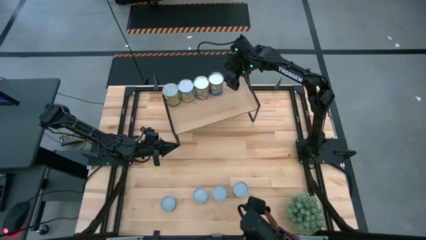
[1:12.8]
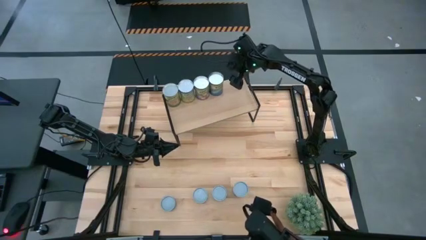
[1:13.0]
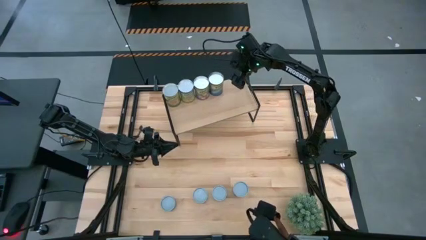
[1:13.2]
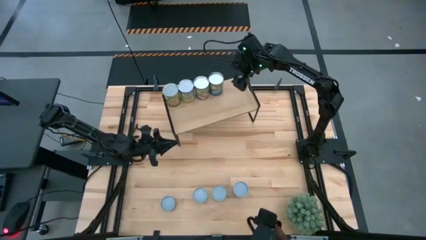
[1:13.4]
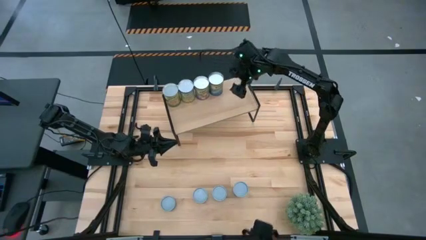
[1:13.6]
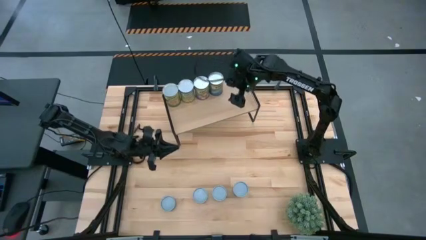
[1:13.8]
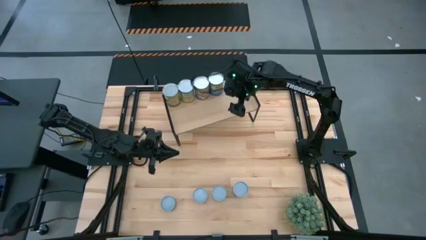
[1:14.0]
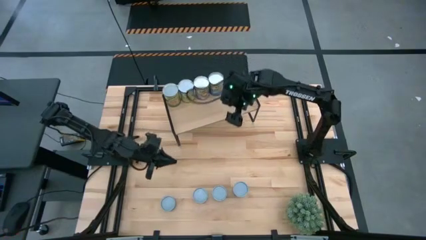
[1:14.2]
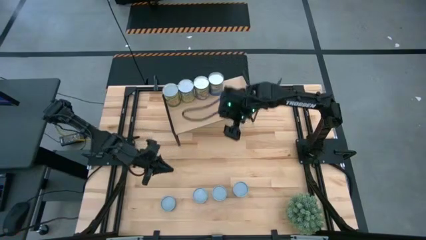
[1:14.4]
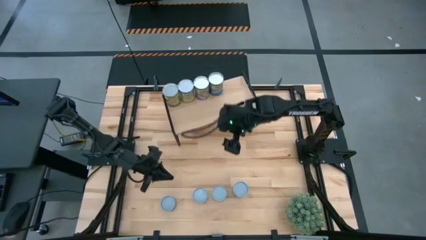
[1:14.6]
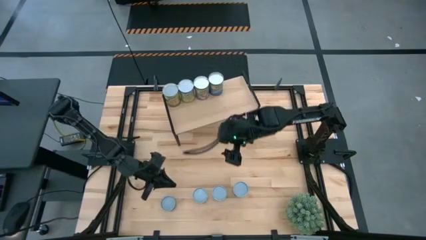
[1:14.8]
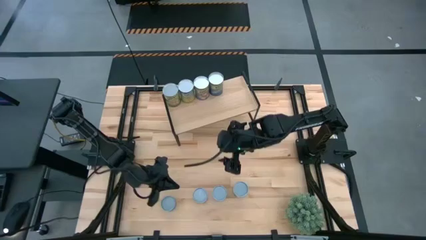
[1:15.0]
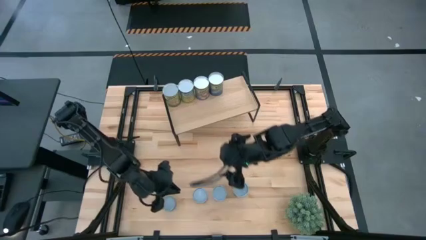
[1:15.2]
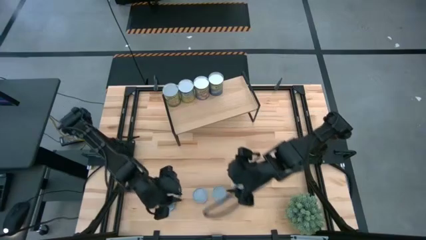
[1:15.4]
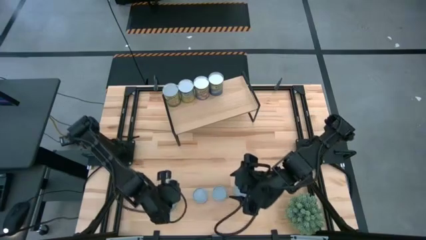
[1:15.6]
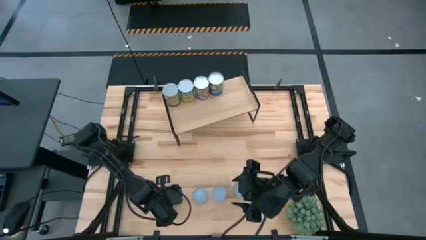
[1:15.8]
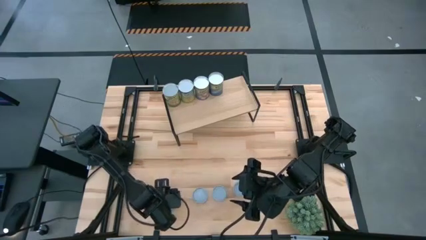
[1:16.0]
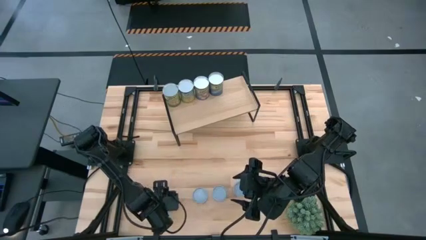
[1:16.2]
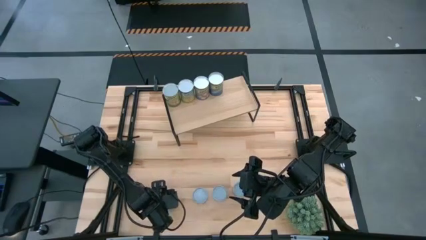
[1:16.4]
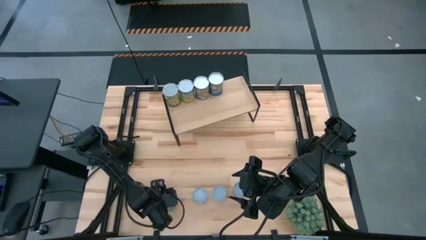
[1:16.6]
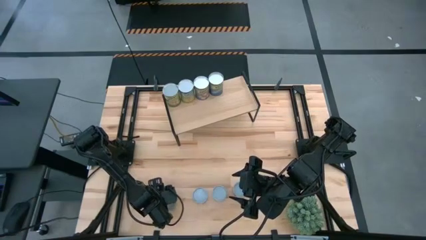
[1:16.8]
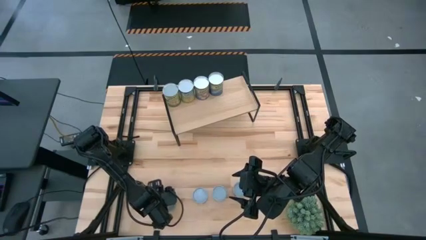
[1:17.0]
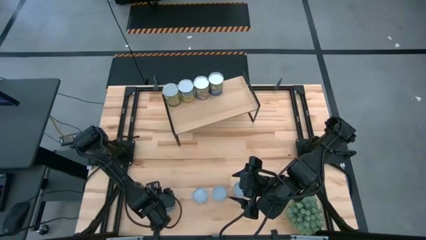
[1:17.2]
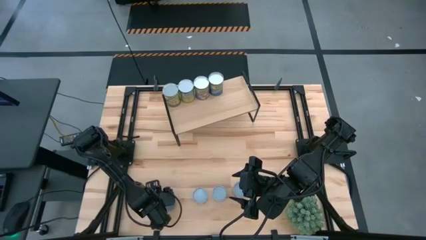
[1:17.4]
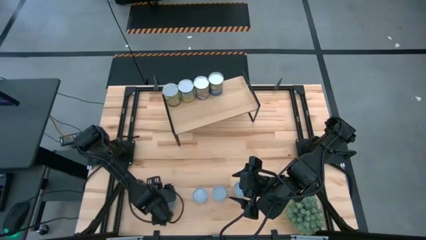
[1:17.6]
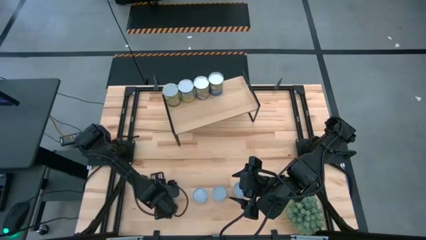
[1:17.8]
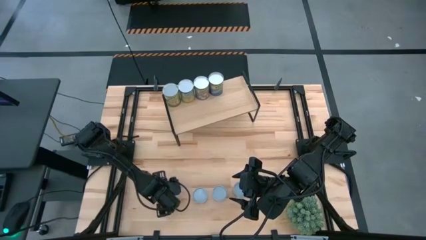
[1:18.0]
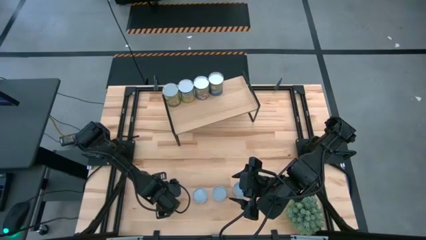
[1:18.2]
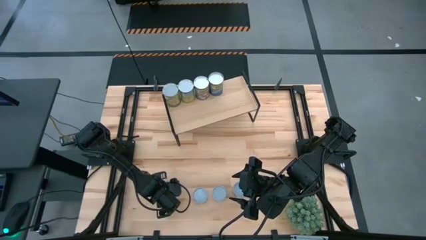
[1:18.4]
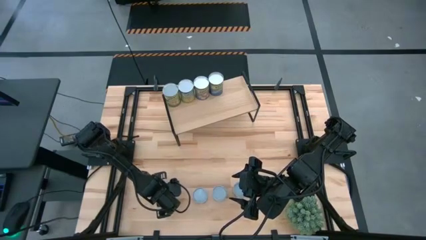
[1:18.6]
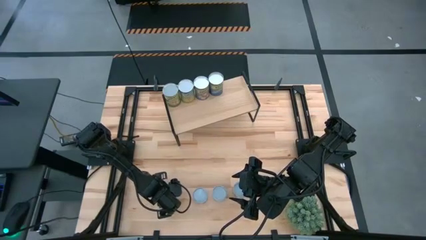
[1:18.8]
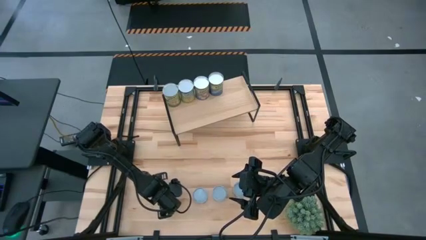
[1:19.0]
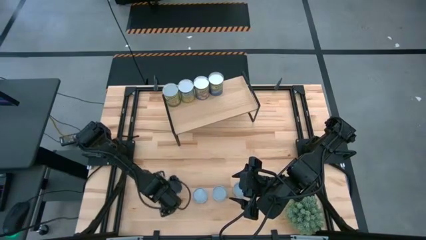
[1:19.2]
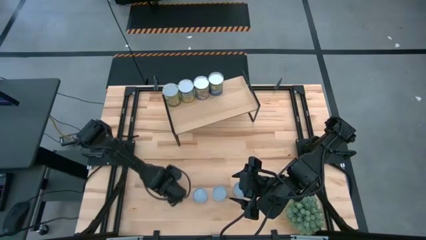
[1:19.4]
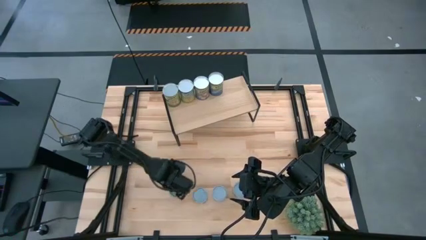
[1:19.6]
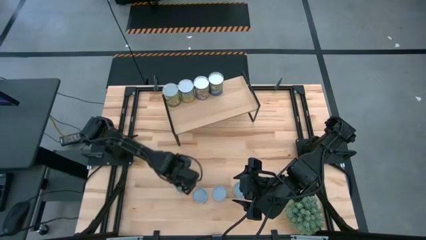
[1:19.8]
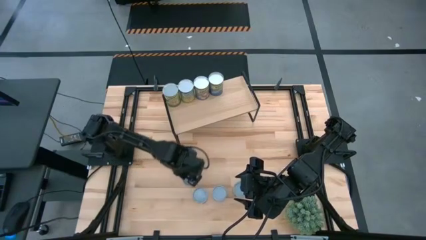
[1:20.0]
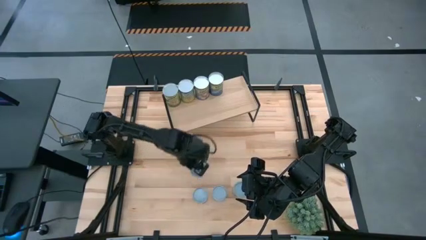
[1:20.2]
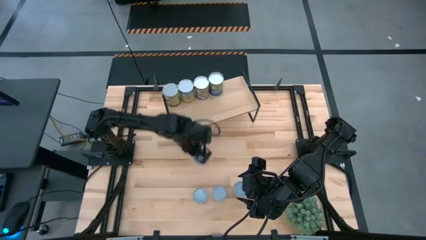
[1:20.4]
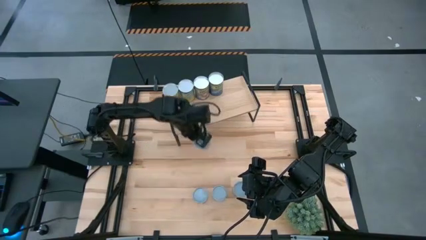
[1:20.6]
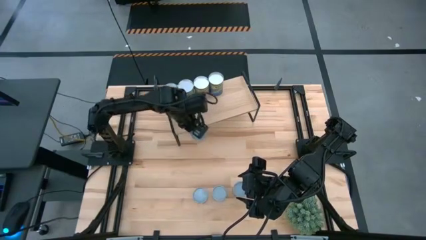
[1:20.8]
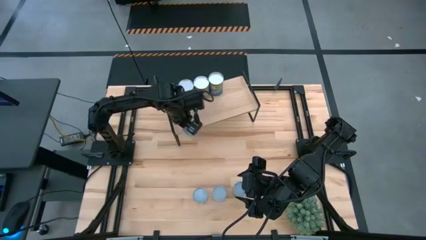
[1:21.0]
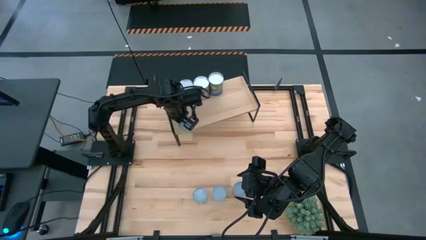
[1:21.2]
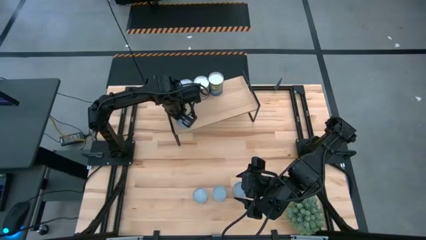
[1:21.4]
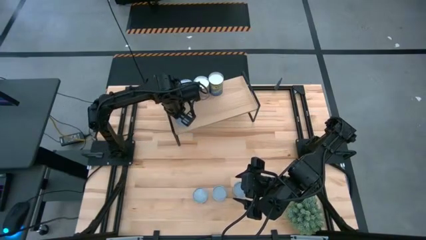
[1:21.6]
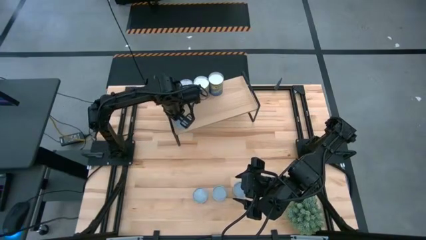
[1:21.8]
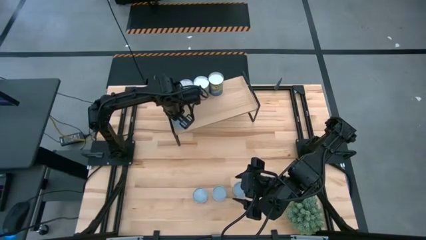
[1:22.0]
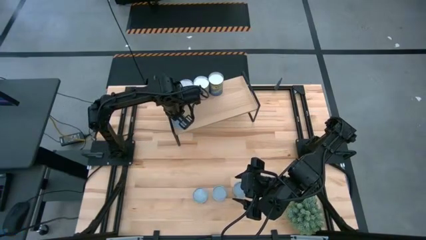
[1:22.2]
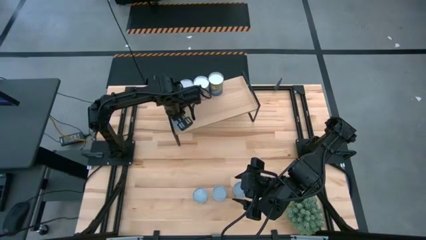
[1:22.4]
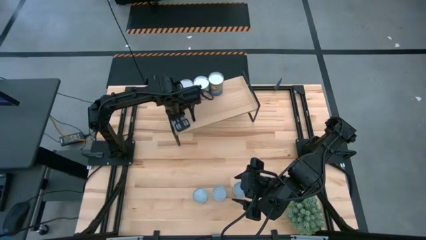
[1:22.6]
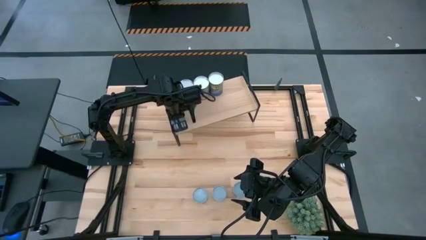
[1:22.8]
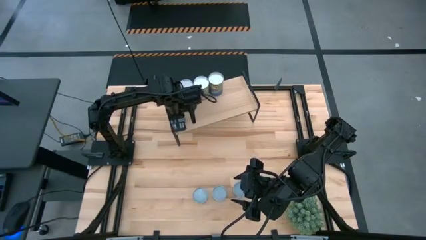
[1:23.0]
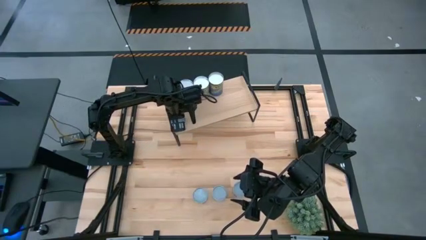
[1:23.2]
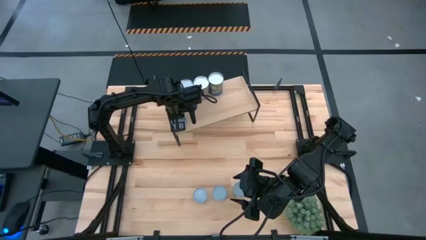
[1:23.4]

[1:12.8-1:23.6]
Task: Pick and place cans onto a shelf
Put the canned tuna on the shelf

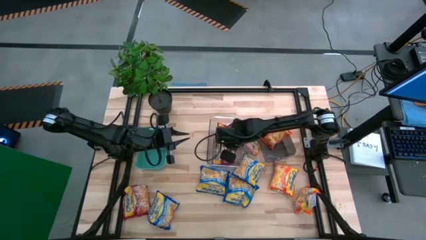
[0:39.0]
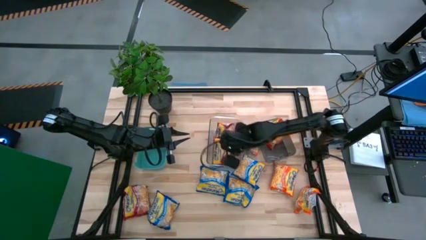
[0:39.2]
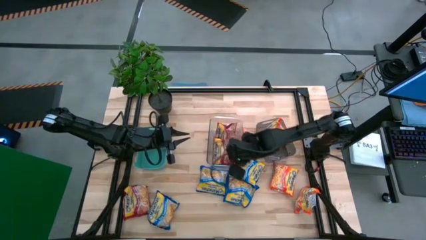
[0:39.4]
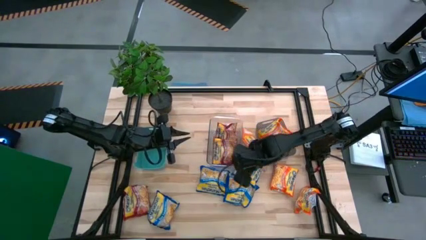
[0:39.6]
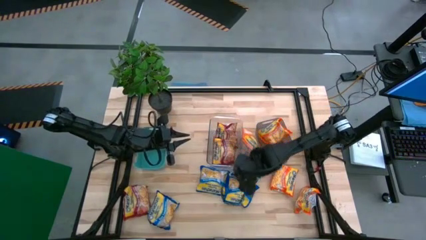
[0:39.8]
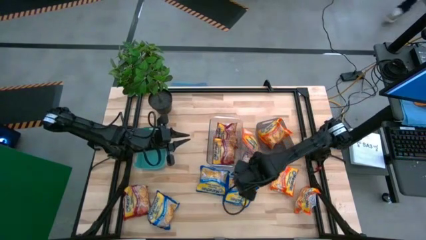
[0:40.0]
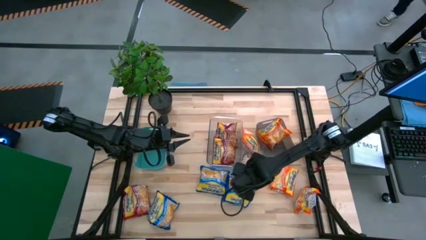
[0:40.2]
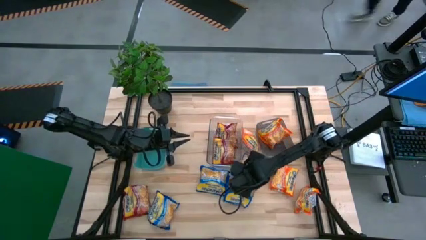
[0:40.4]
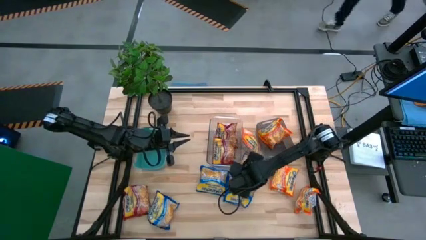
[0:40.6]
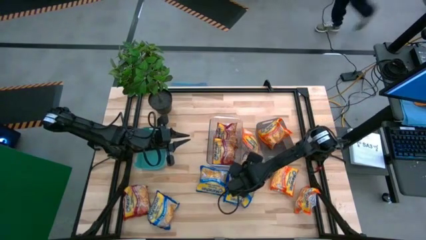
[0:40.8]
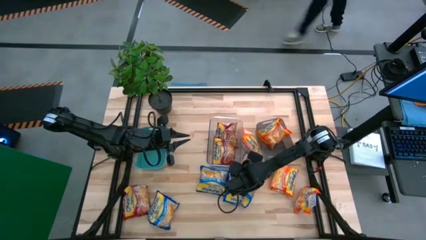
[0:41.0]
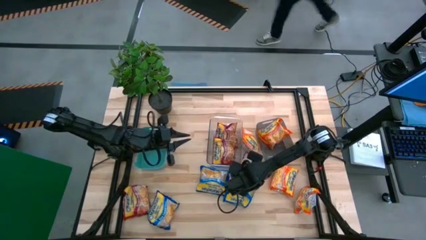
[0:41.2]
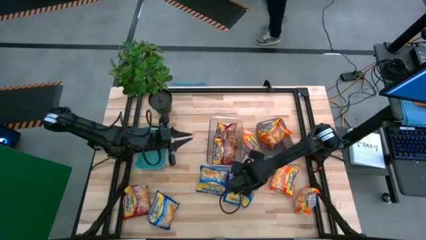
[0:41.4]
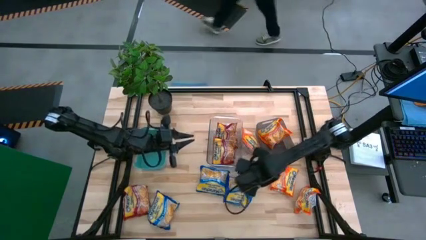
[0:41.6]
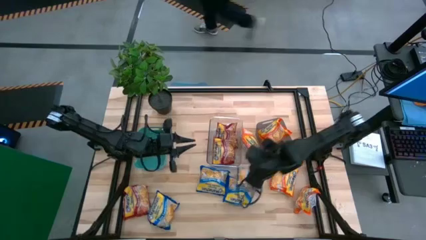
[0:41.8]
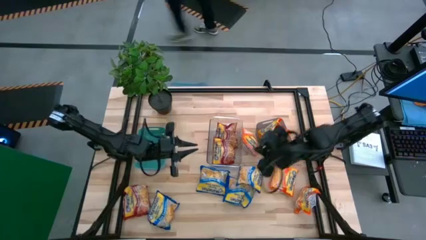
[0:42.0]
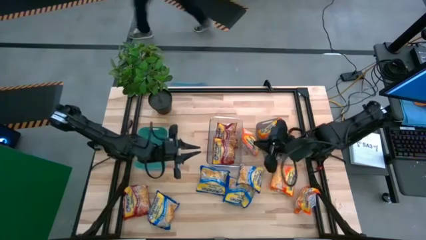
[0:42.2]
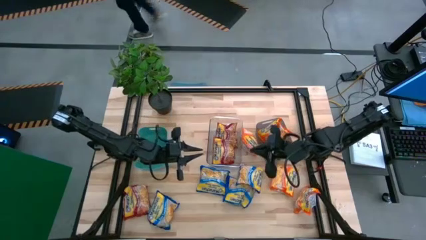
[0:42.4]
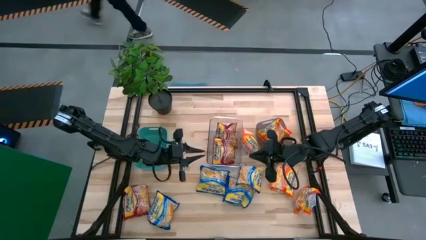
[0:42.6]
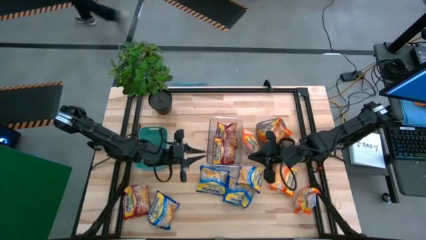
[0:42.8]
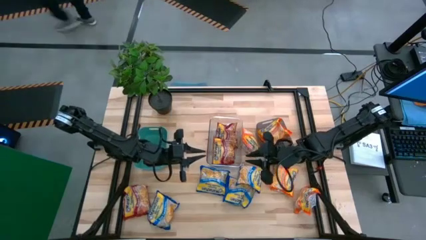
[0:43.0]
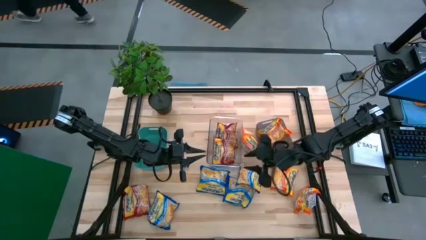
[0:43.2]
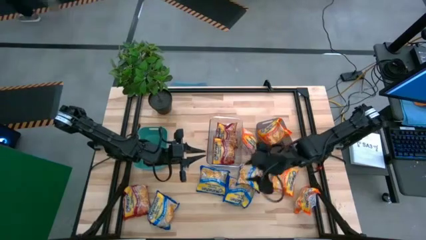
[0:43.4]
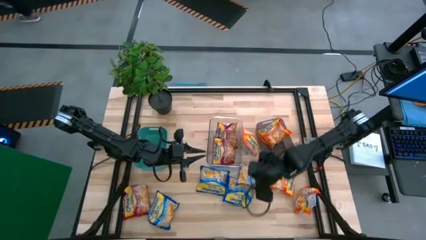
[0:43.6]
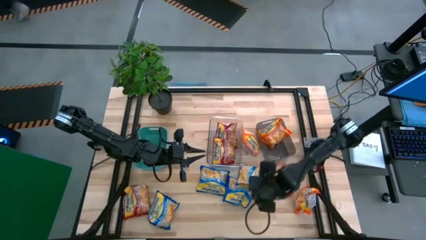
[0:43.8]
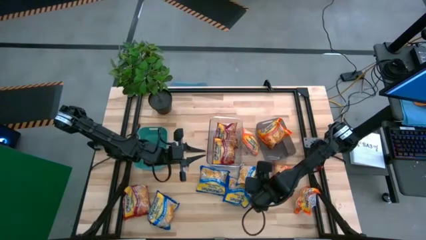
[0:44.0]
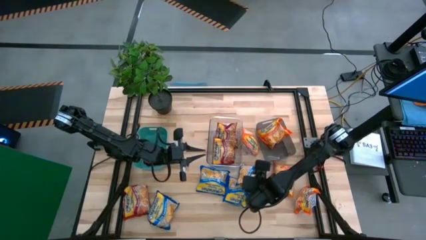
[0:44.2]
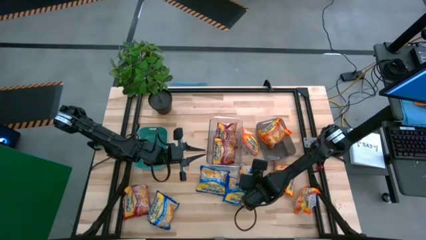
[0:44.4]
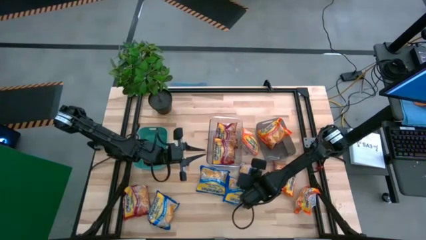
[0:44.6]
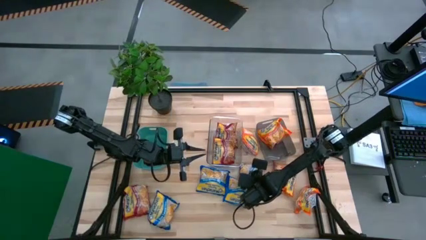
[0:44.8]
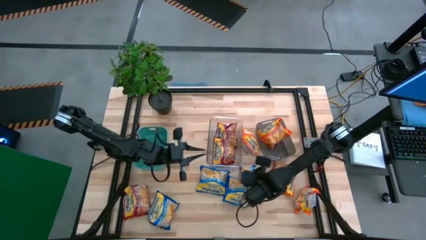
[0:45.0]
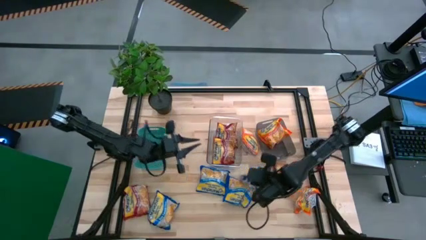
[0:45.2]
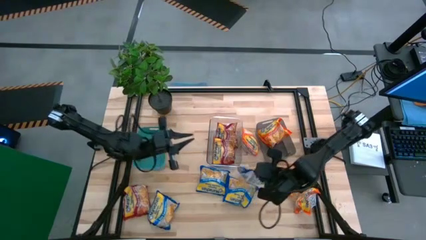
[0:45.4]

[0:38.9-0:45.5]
Task: Sort Maruchan noodles
Put the blue noodle pack into the green bin
